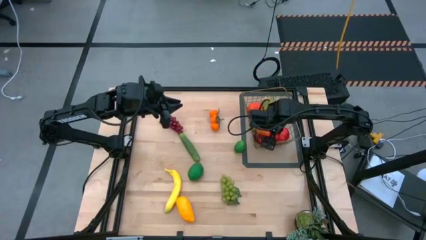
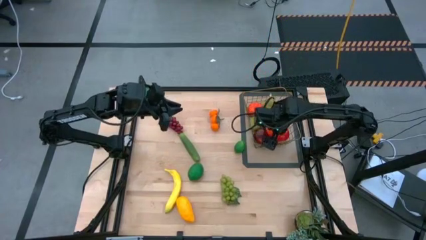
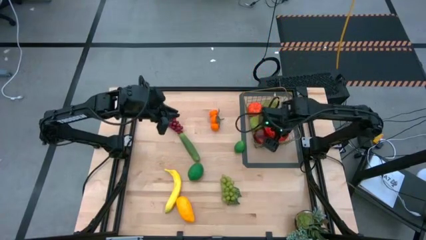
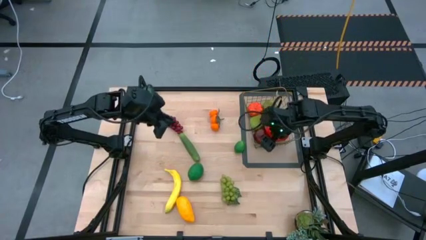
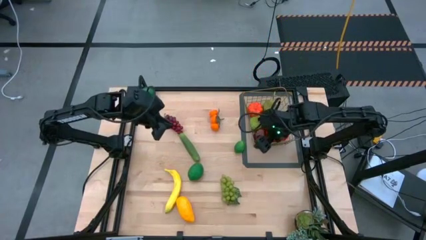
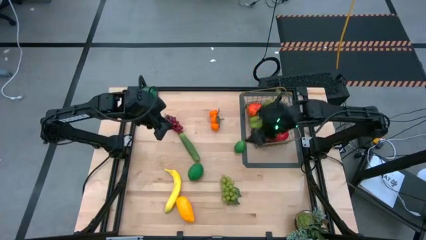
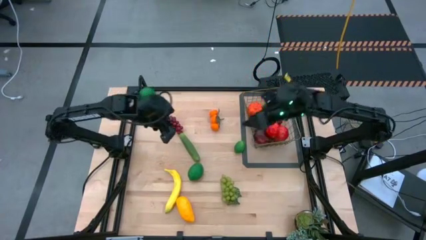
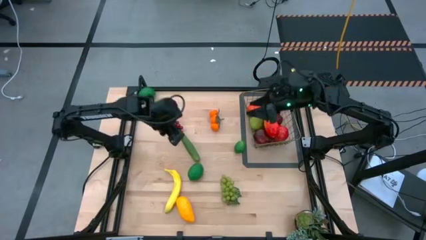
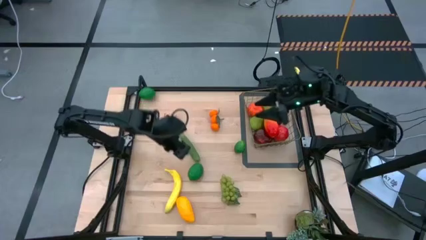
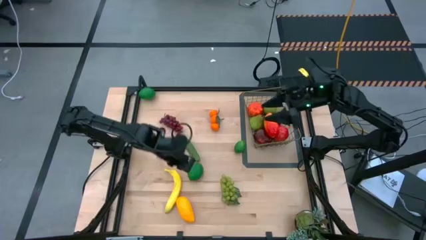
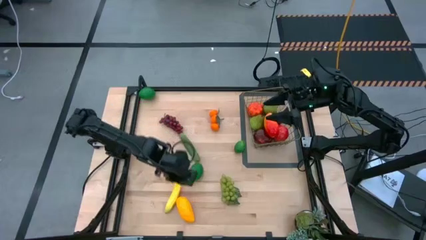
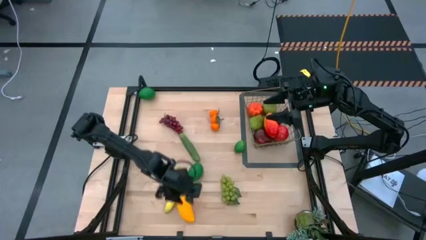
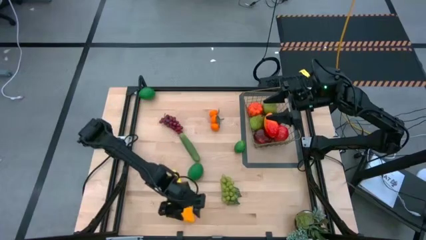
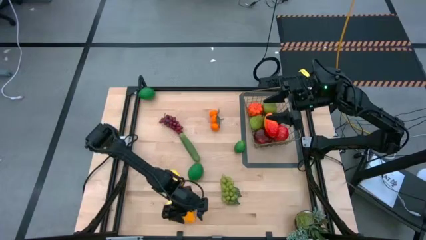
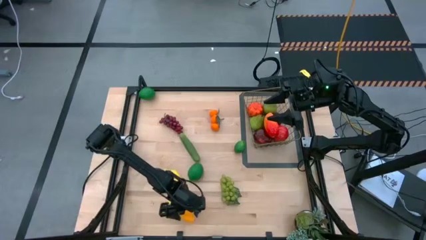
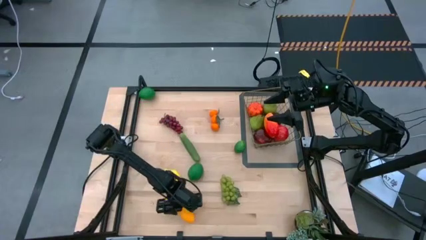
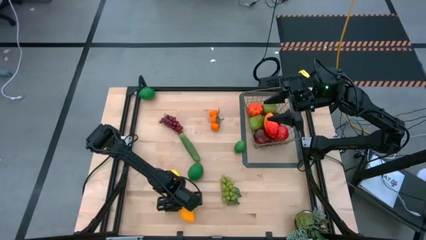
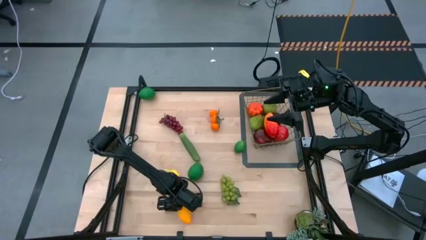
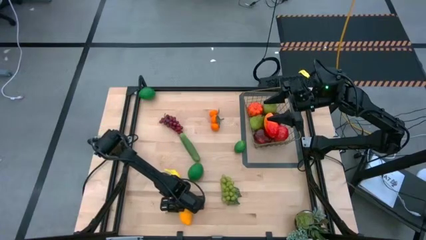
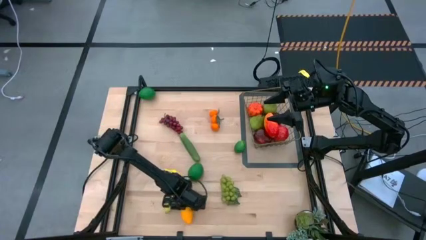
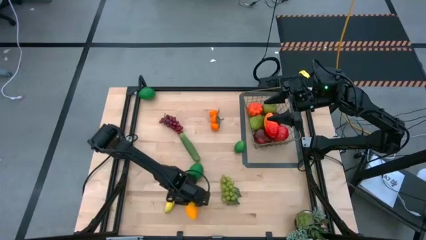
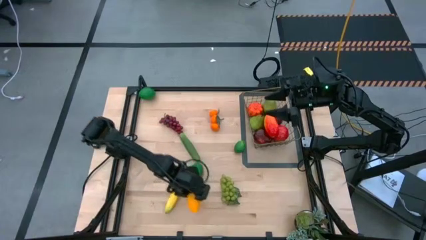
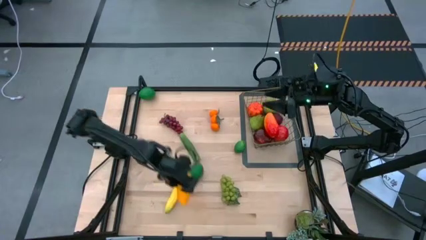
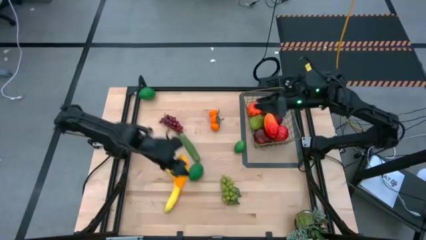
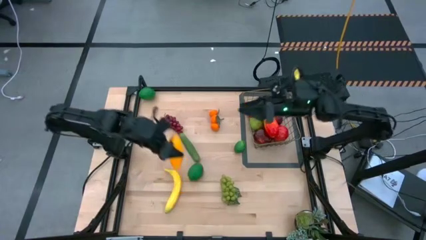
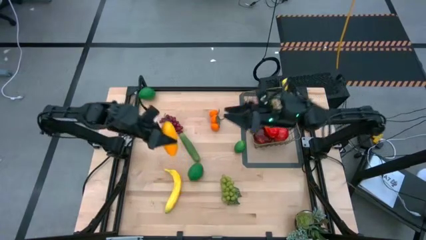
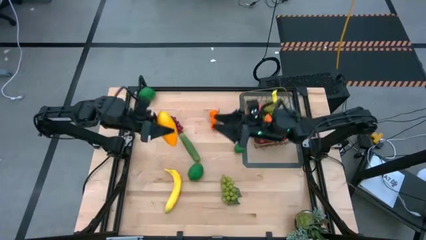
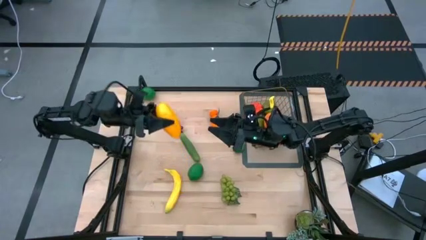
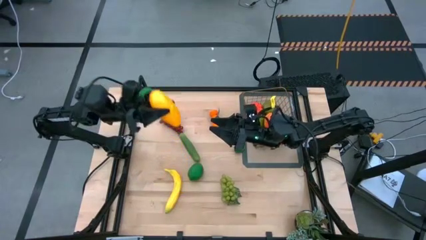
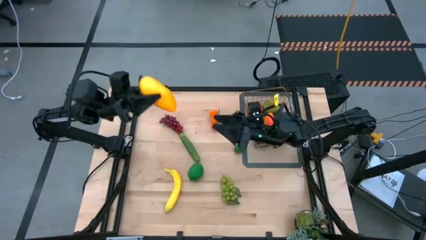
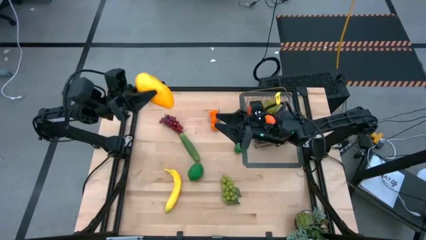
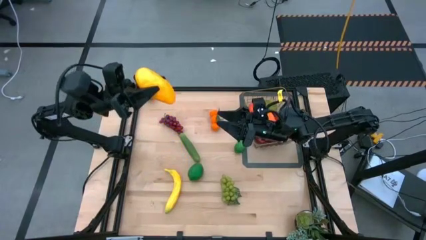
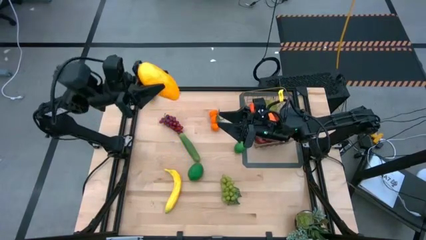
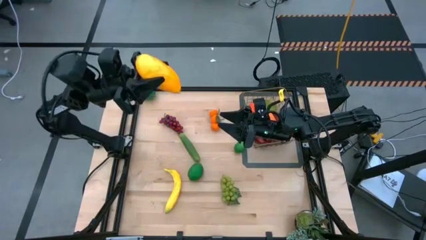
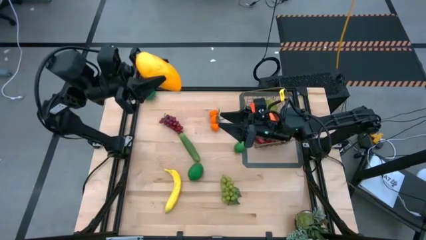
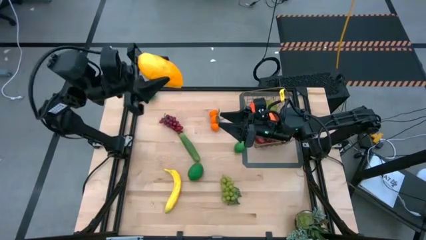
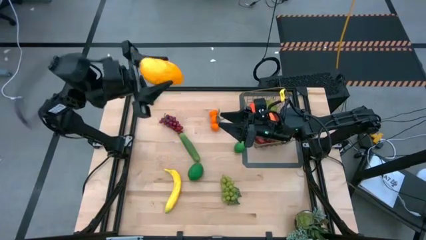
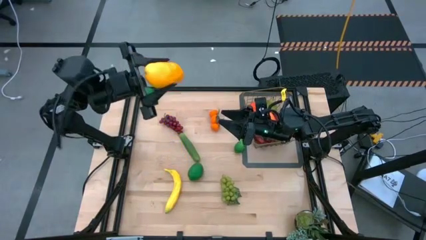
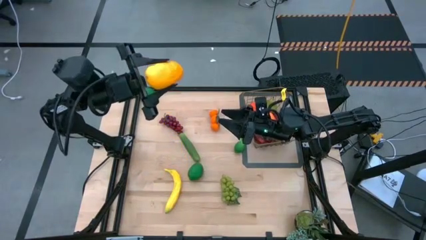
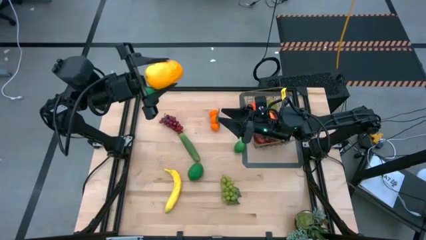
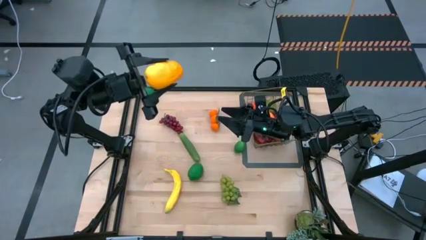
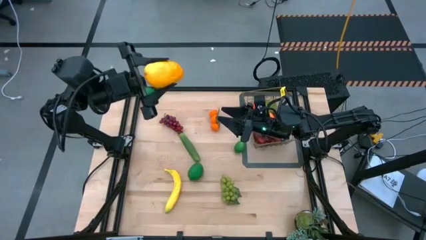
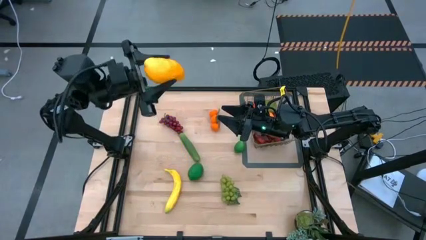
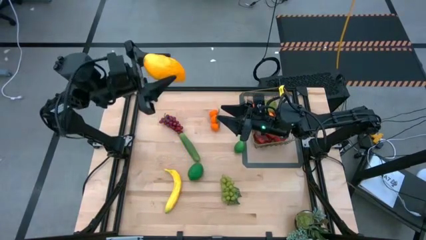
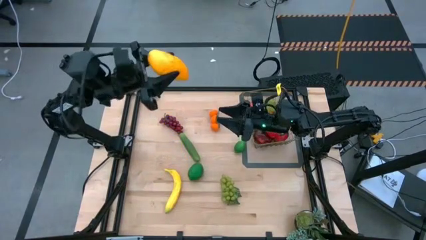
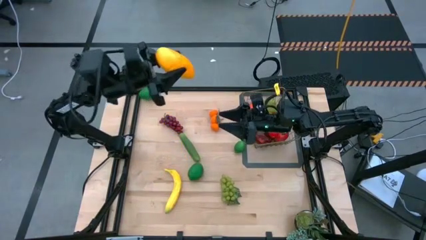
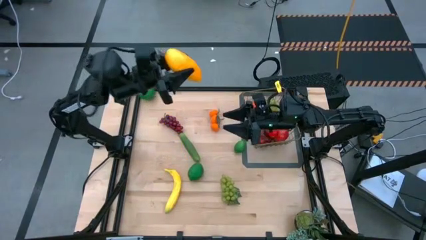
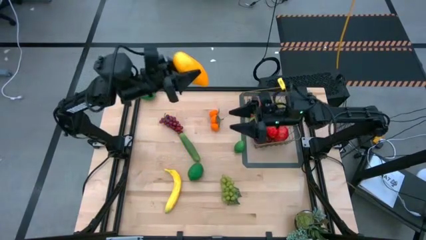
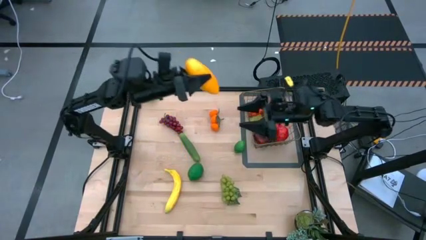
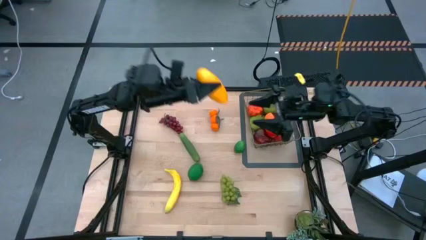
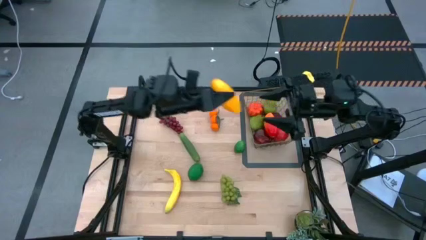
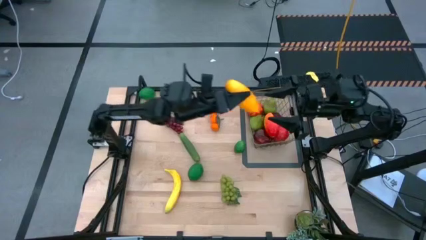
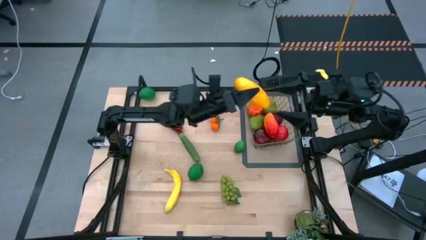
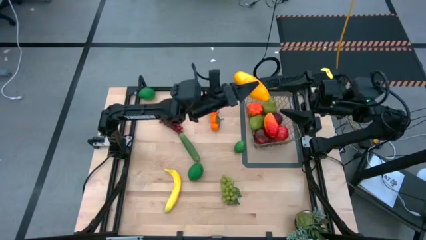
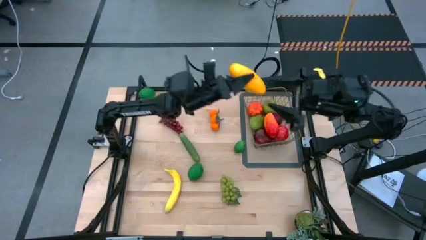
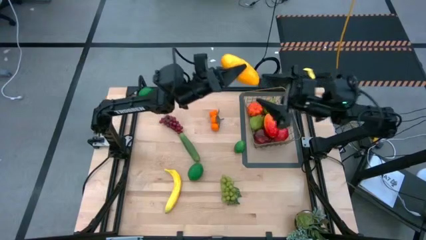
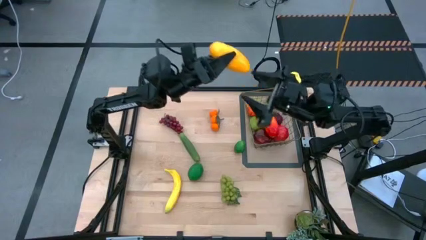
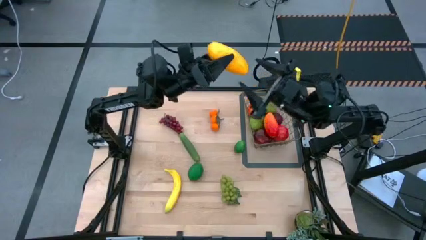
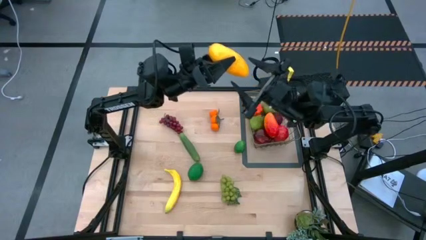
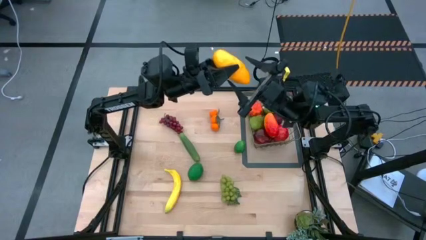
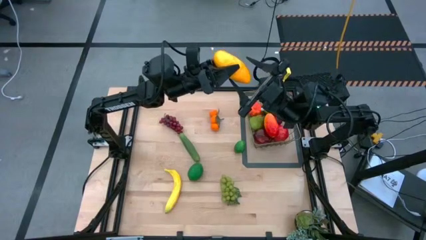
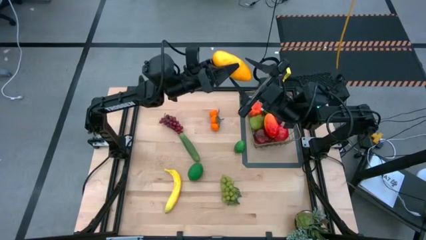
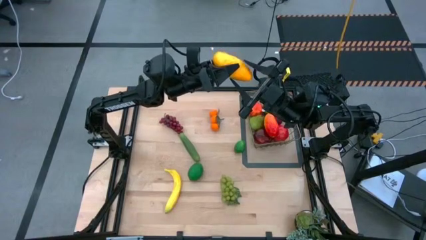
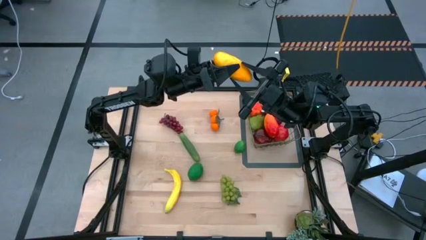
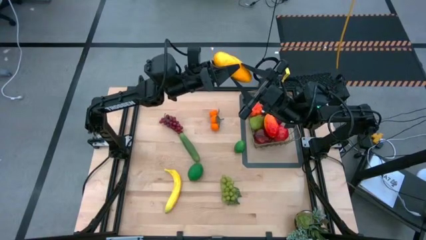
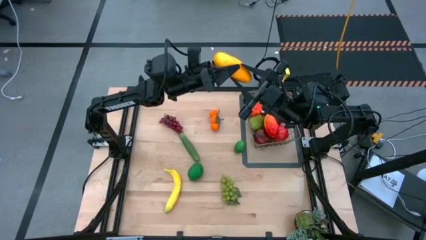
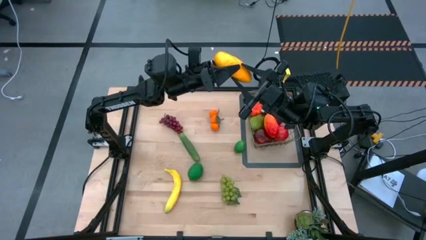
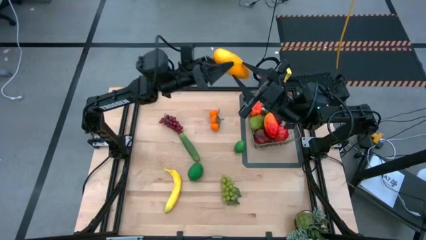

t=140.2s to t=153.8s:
Task: Build produce basket
Put the yellow mango into the wire basket

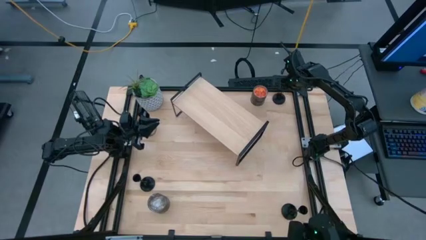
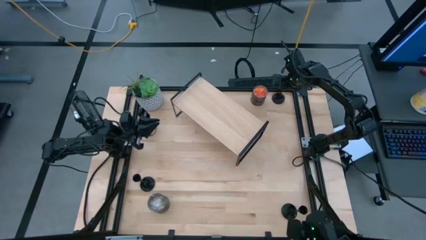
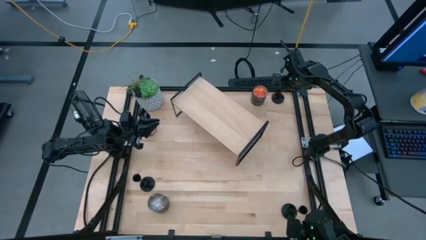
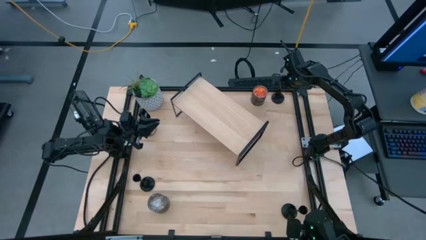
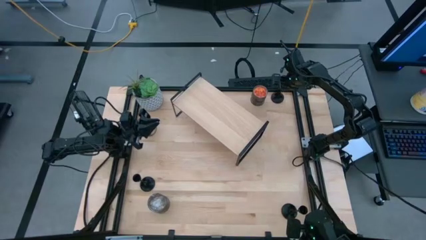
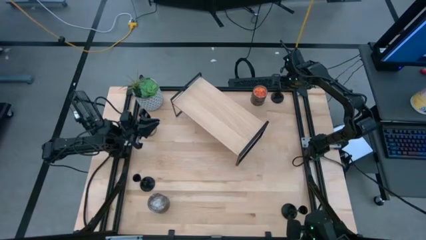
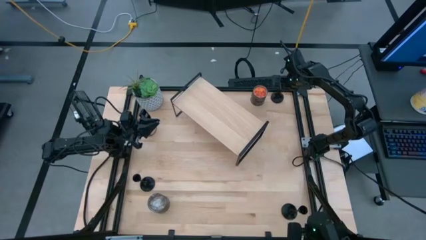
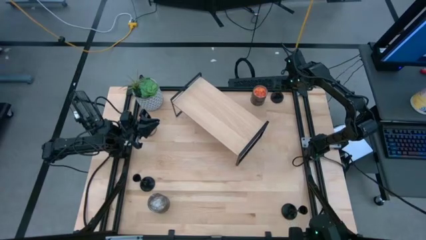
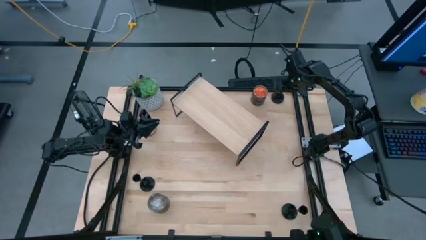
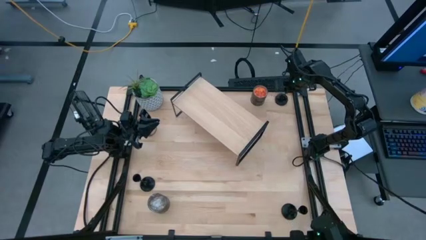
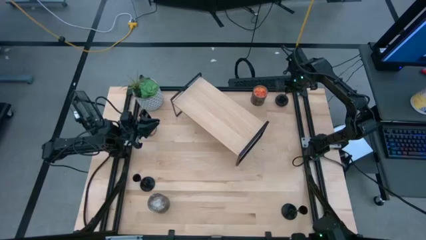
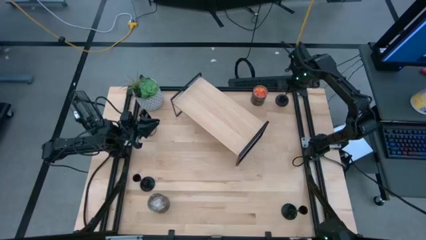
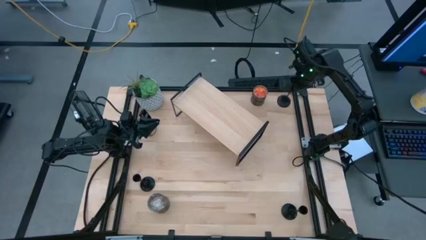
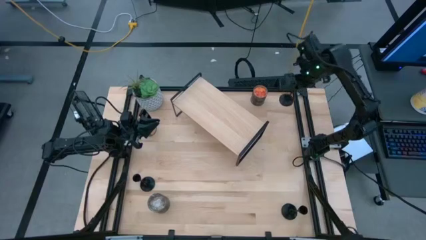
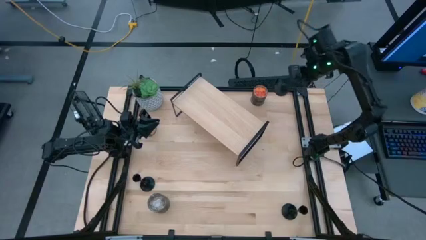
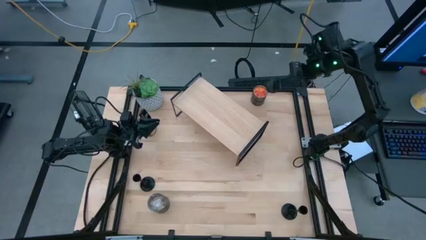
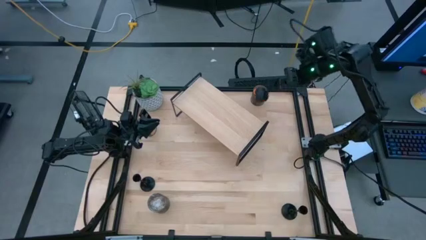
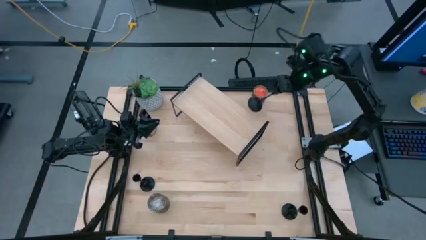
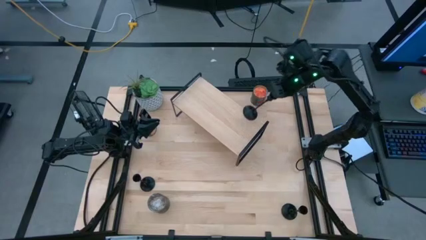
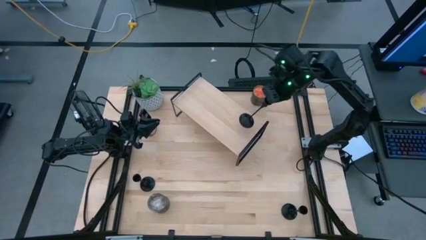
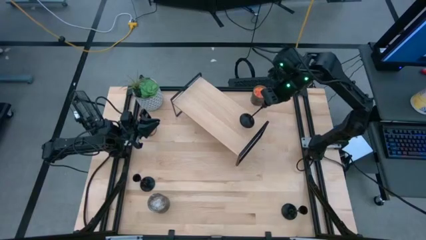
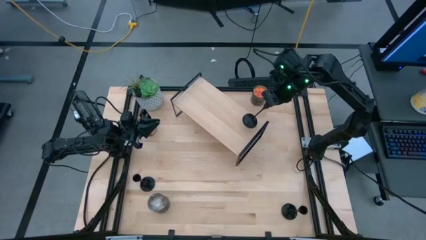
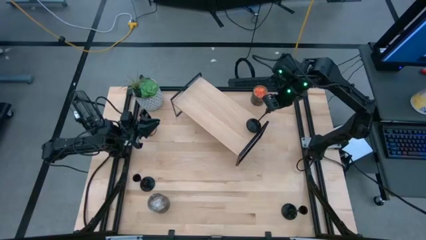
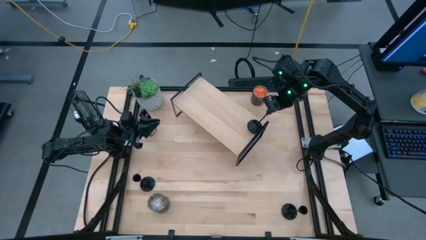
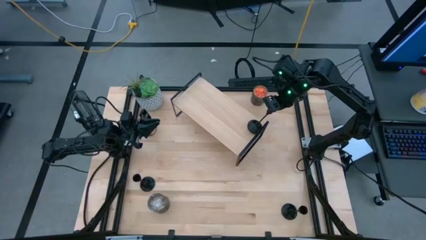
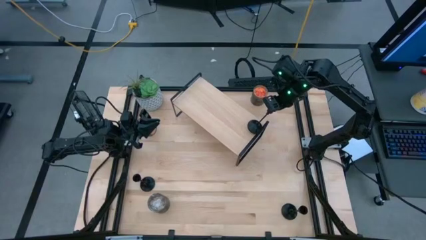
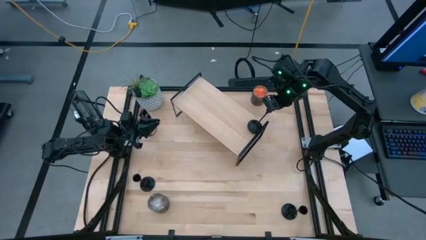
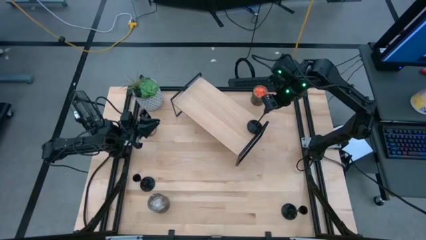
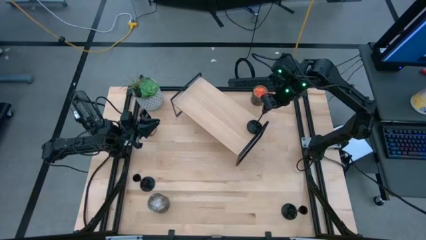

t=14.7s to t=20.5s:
Task: Pick & Place candle stick holders
Put the top right black candle holder on the shelf
